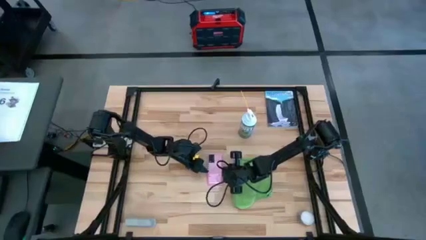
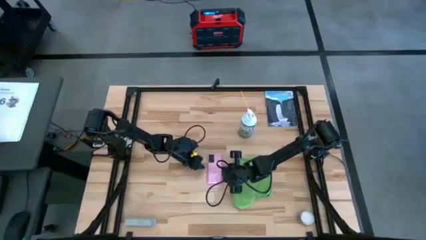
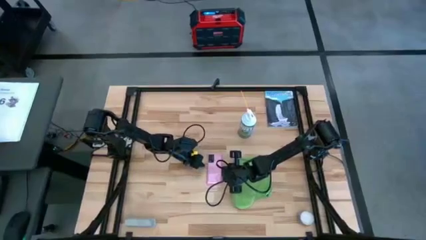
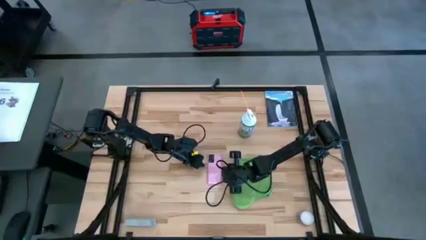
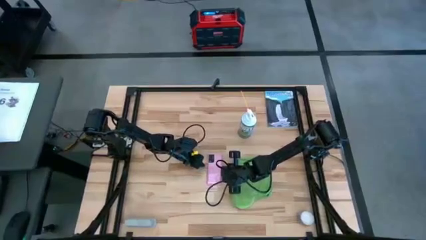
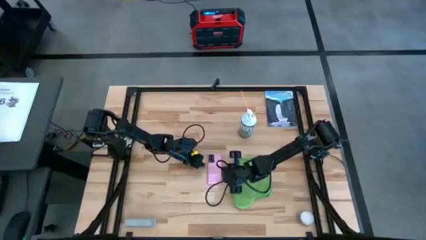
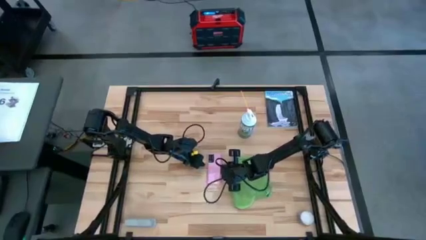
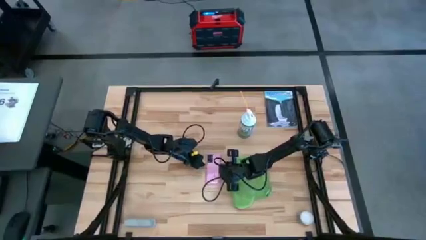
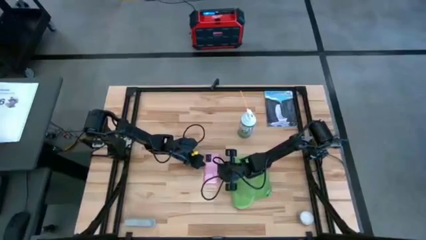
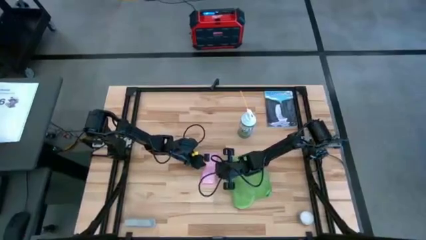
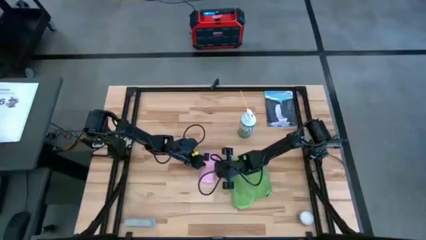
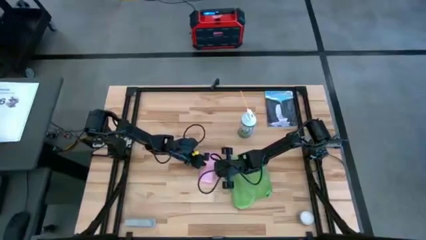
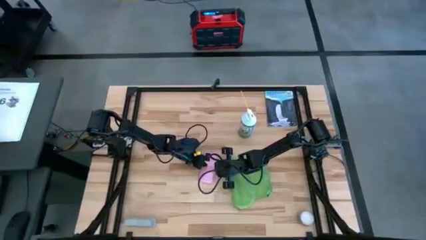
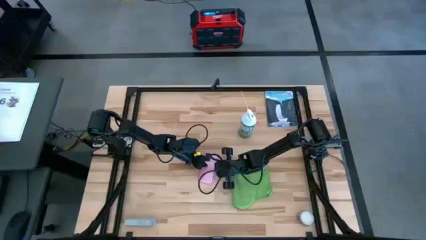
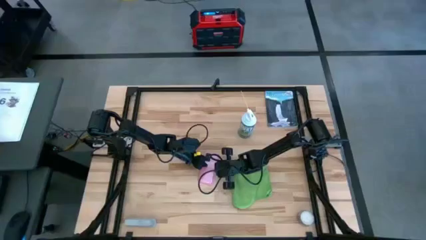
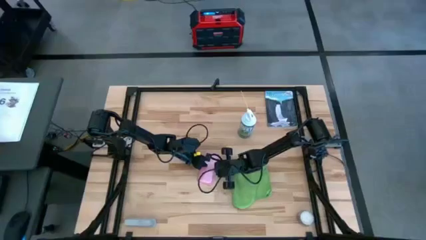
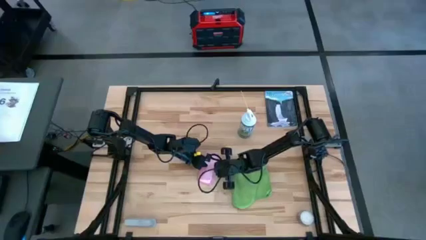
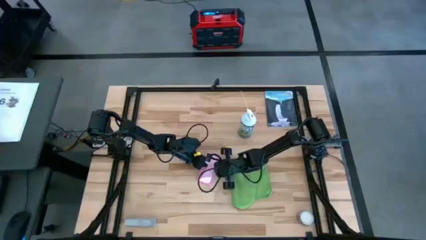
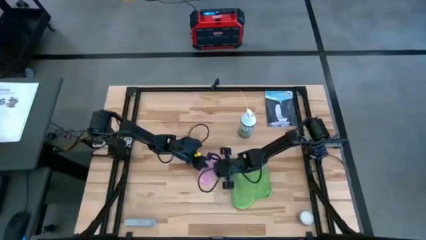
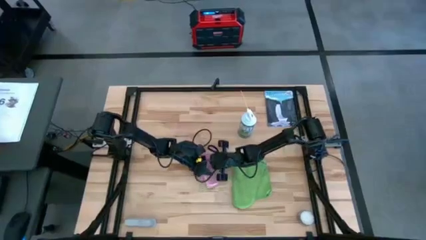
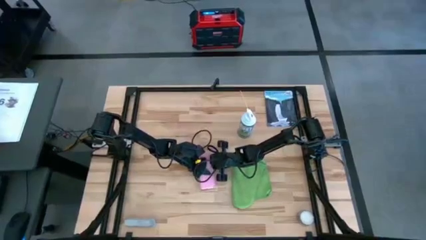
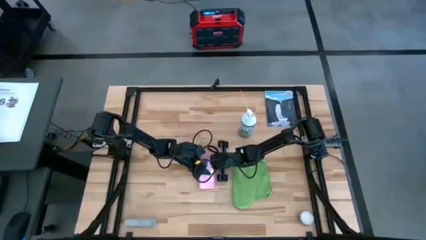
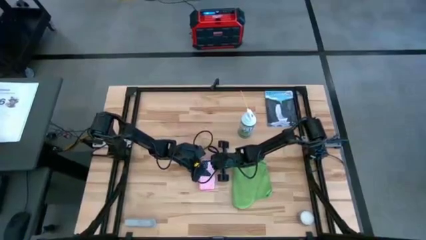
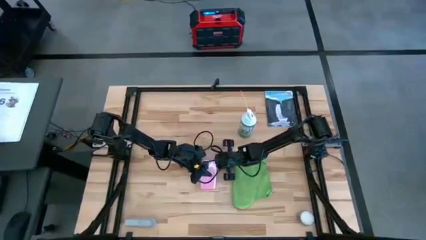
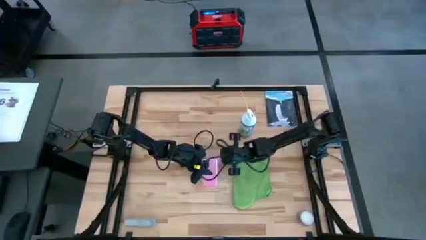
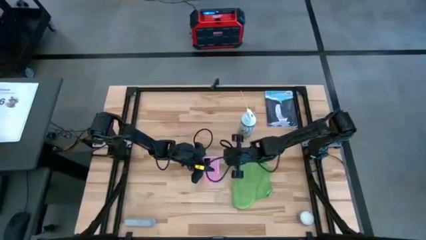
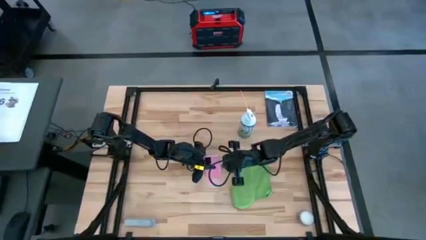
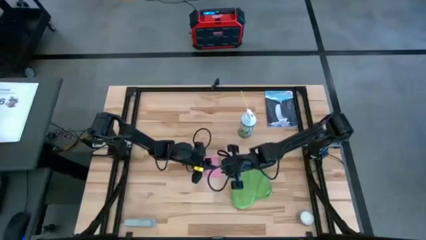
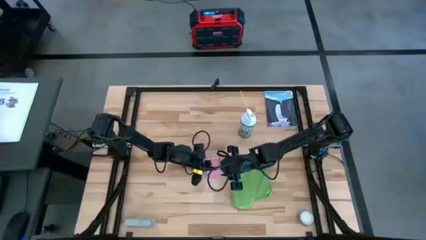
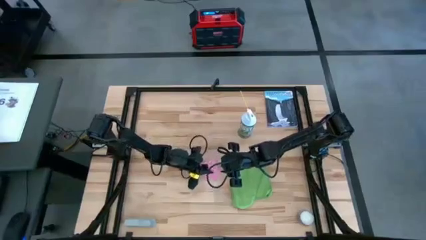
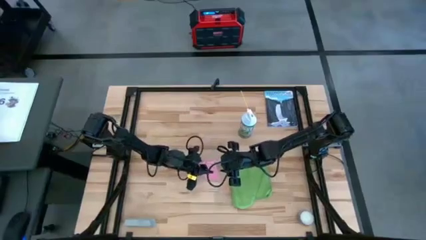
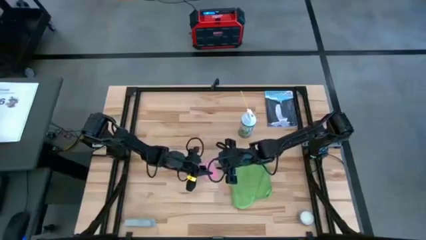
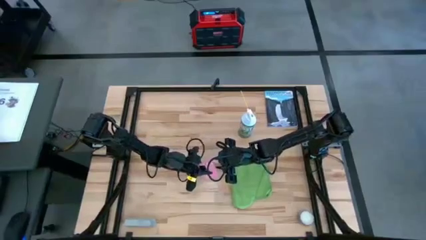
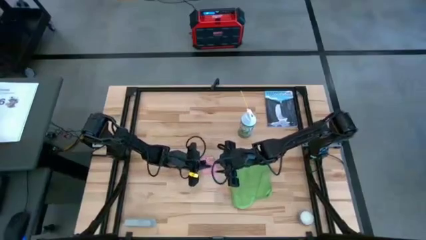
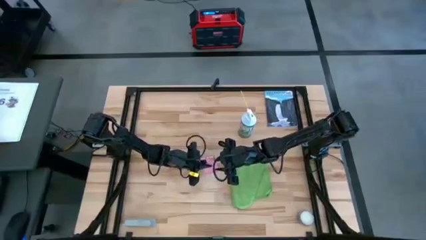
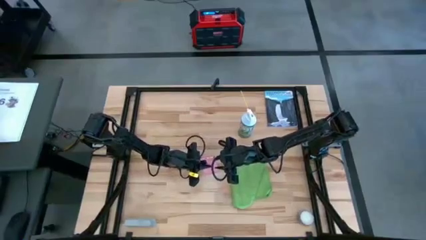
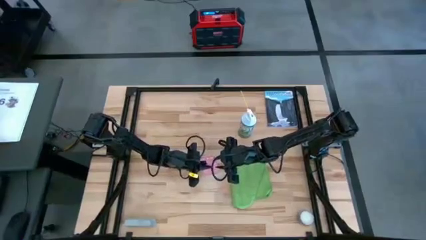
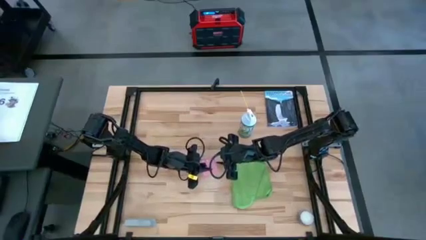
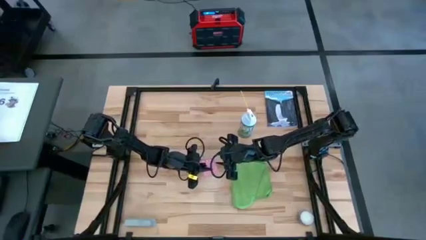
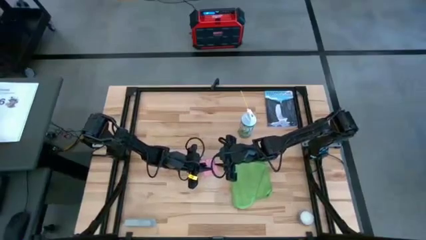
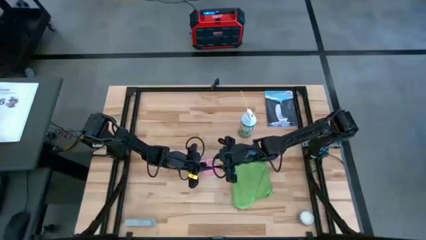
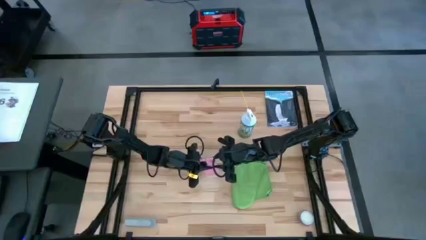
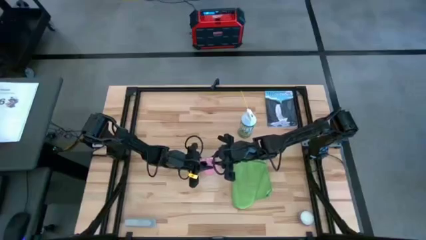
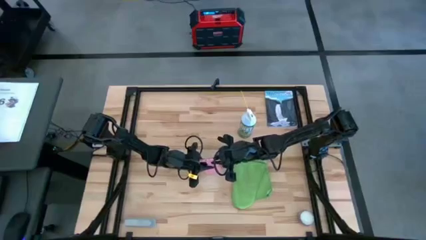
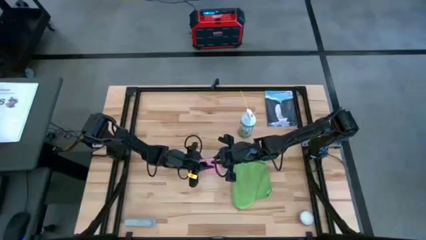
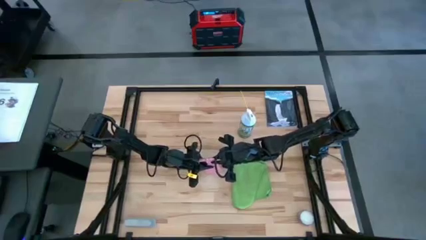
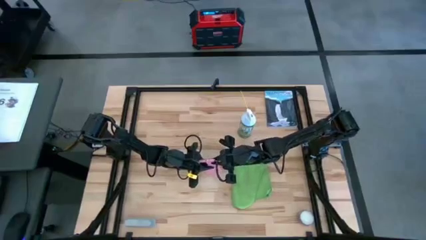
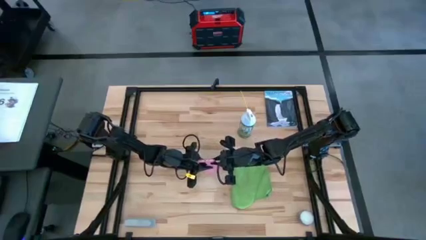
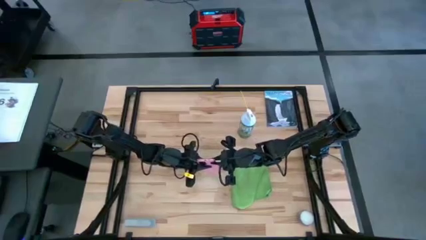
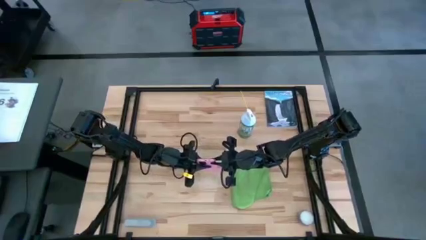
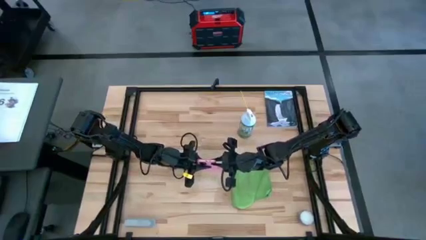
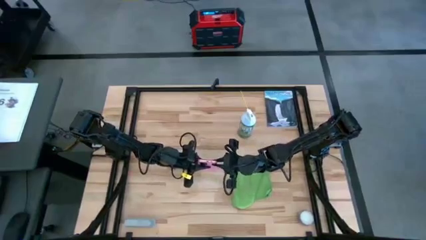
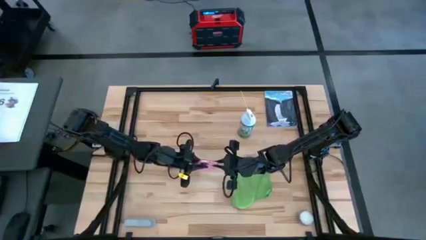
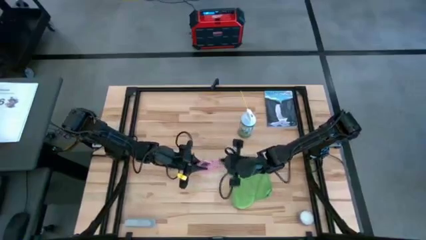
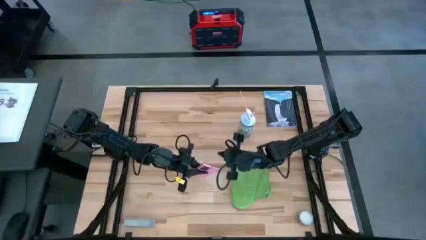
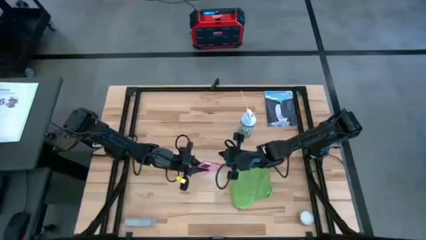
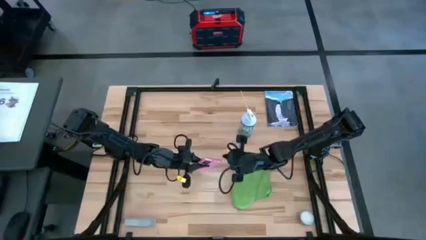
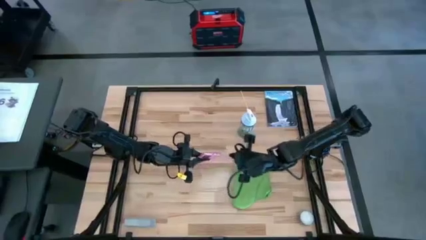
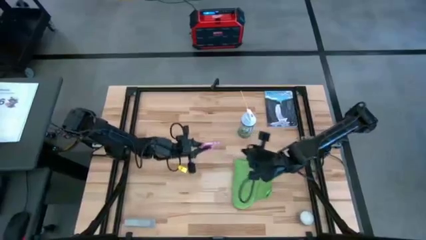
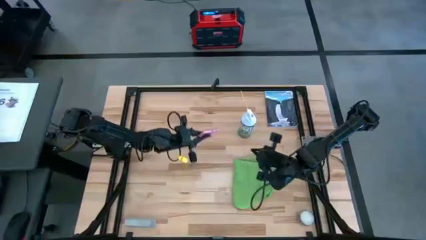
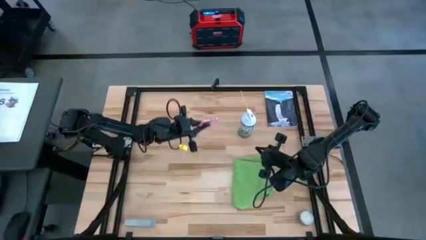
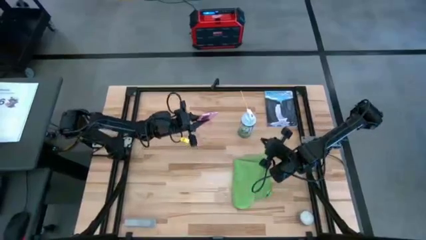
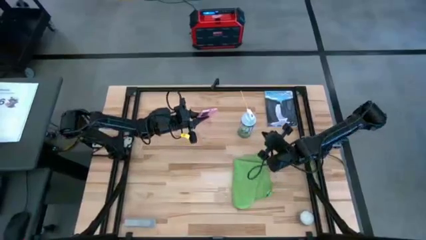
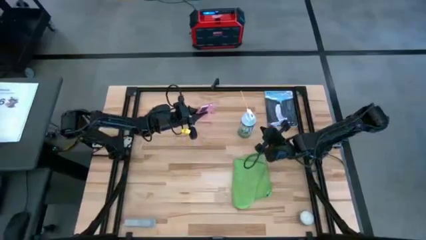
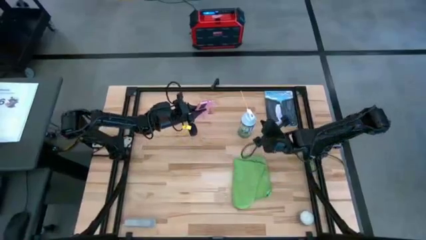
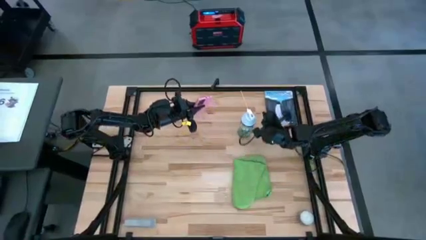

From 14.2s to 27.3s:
Task: Apply microfiber cloth
Spray the back of the pink phone using the white spray bottle
